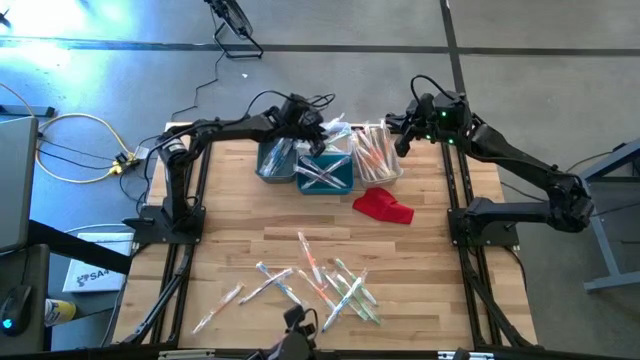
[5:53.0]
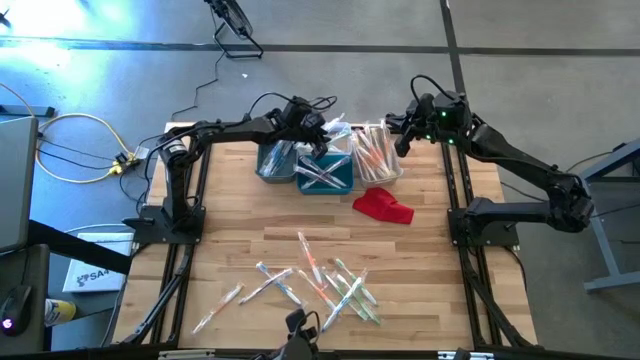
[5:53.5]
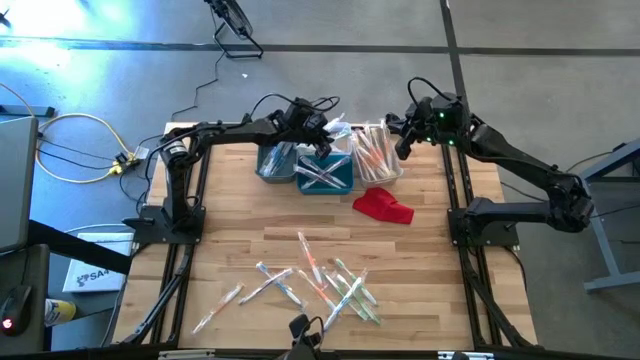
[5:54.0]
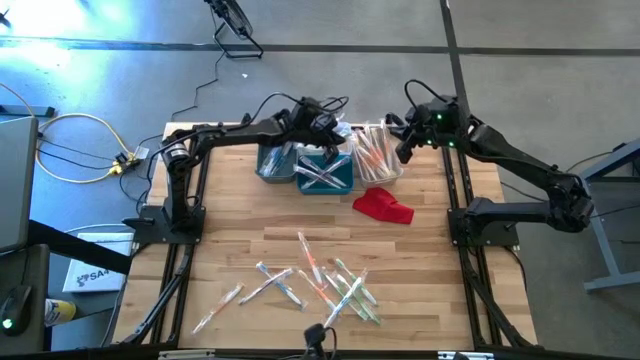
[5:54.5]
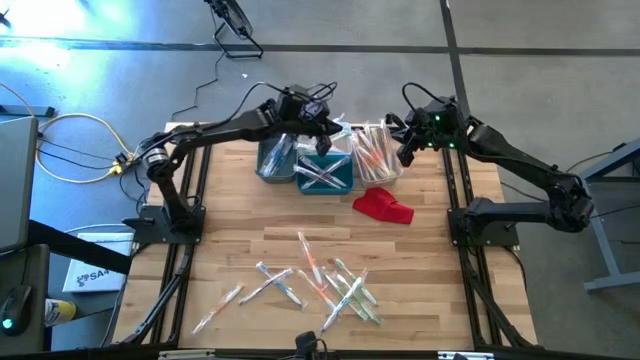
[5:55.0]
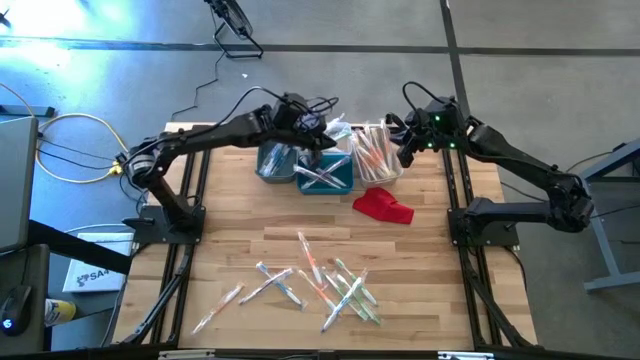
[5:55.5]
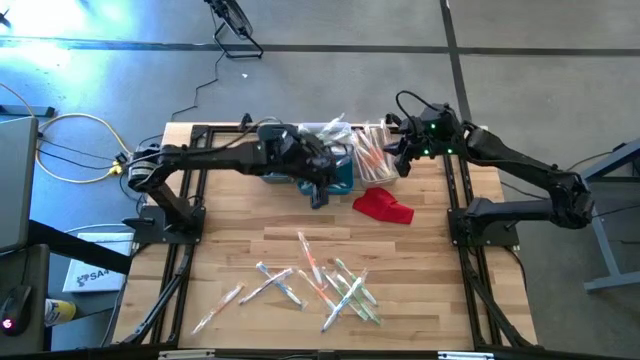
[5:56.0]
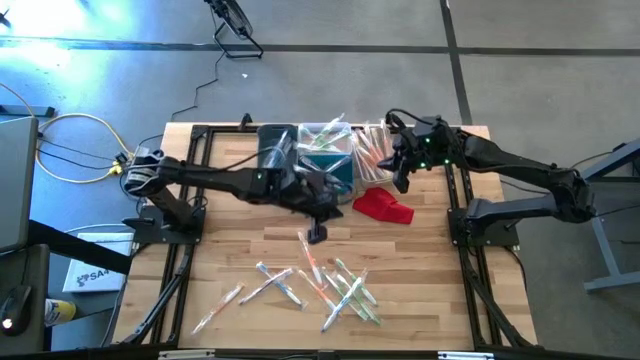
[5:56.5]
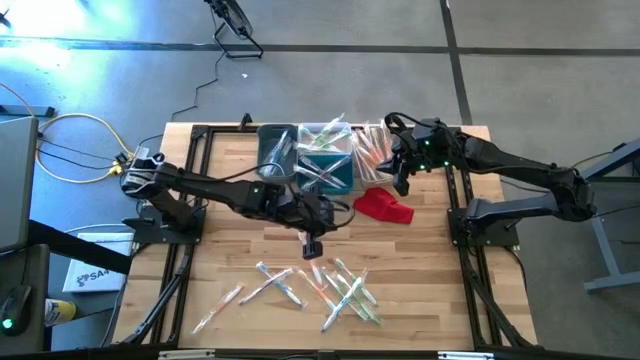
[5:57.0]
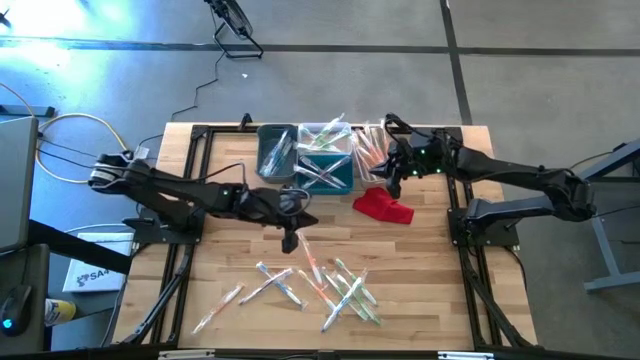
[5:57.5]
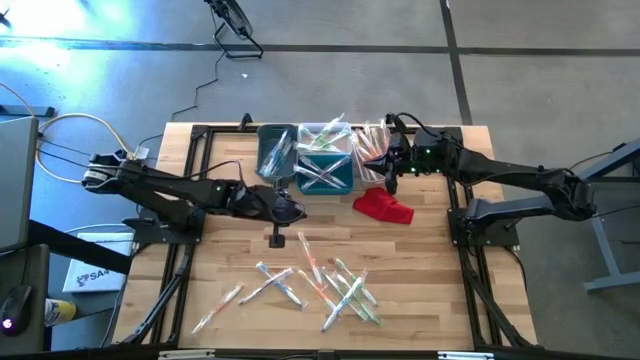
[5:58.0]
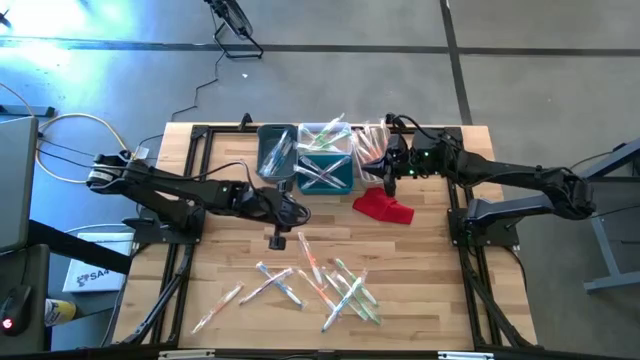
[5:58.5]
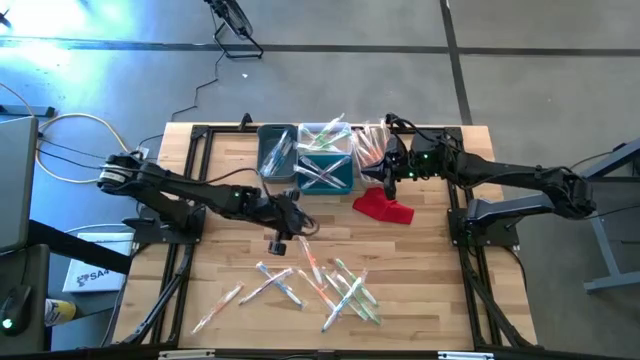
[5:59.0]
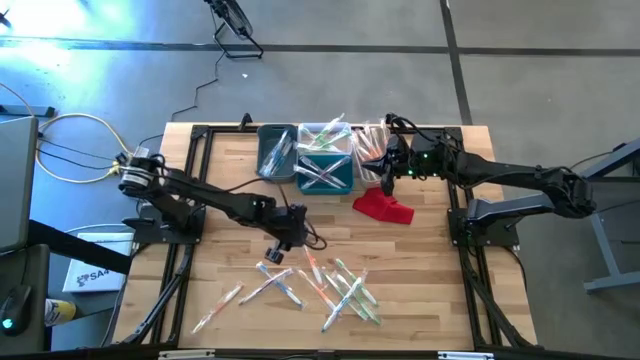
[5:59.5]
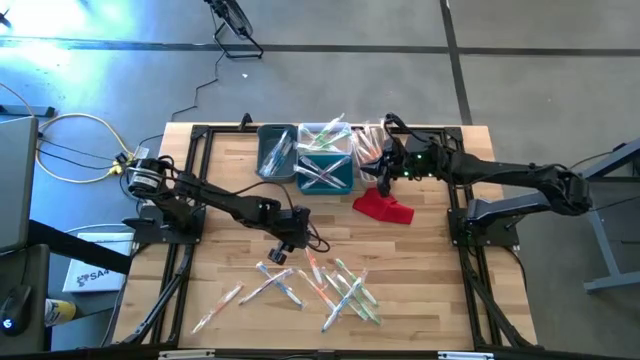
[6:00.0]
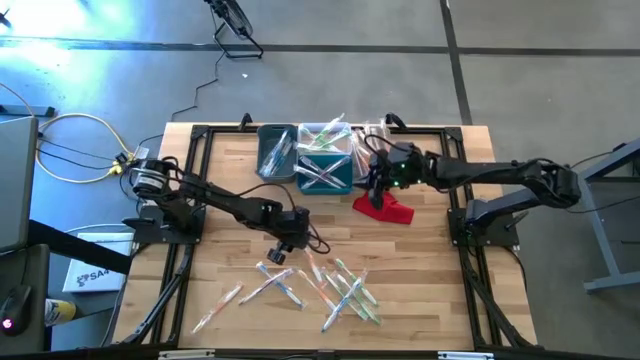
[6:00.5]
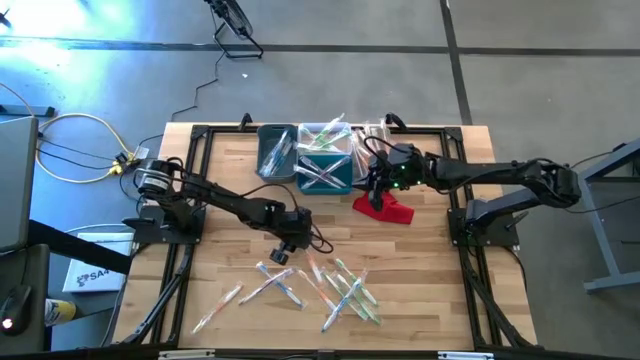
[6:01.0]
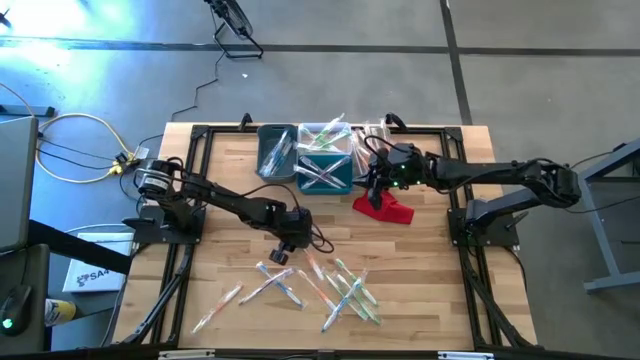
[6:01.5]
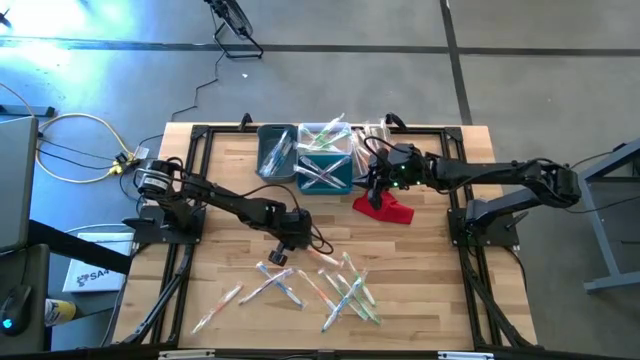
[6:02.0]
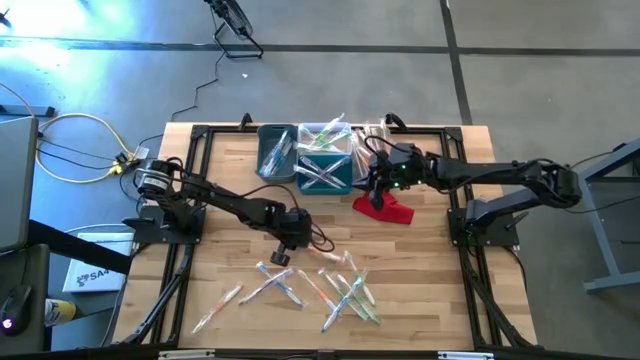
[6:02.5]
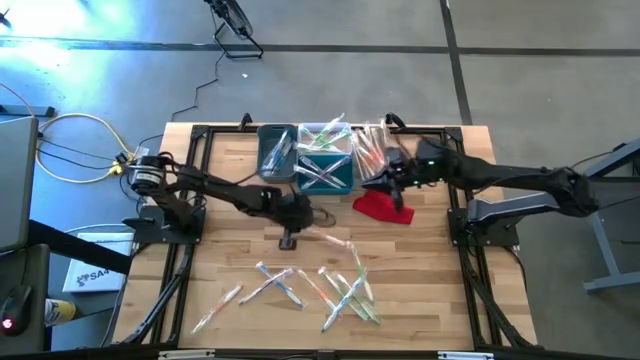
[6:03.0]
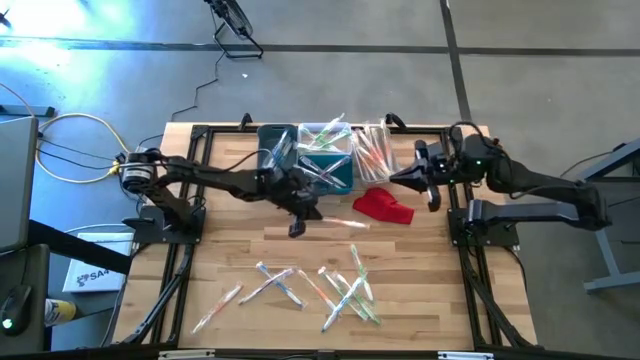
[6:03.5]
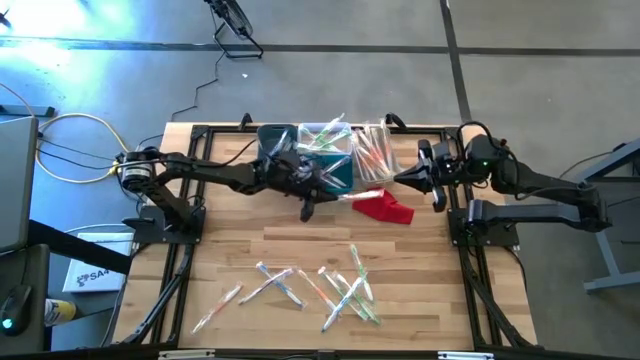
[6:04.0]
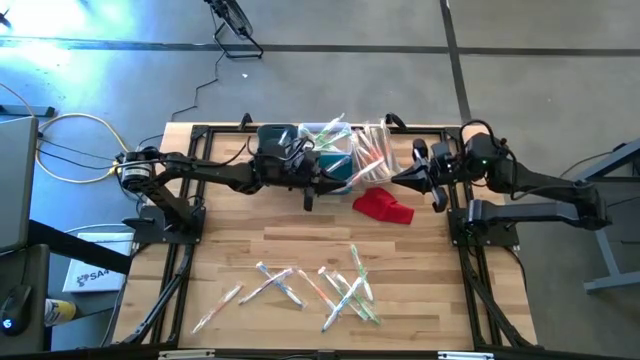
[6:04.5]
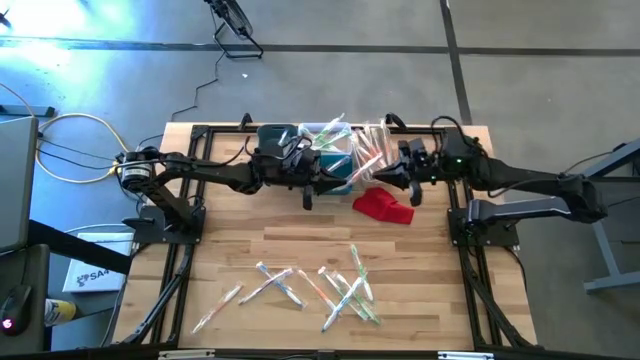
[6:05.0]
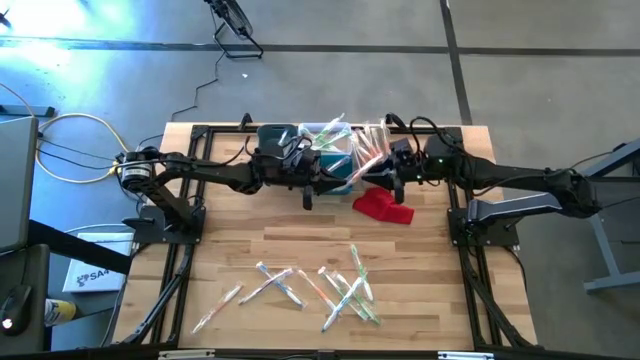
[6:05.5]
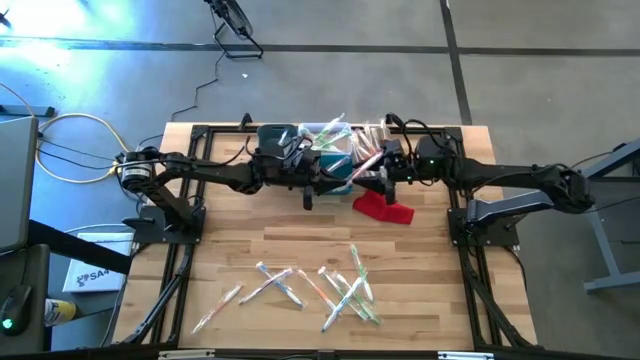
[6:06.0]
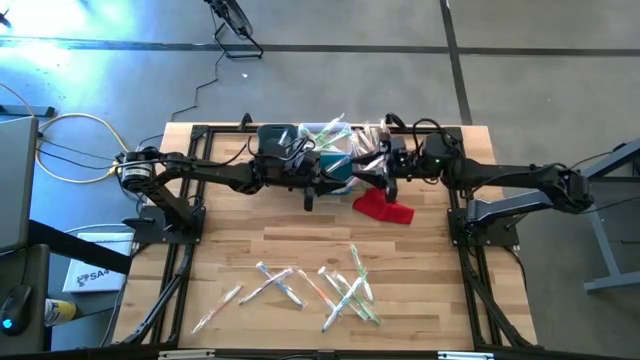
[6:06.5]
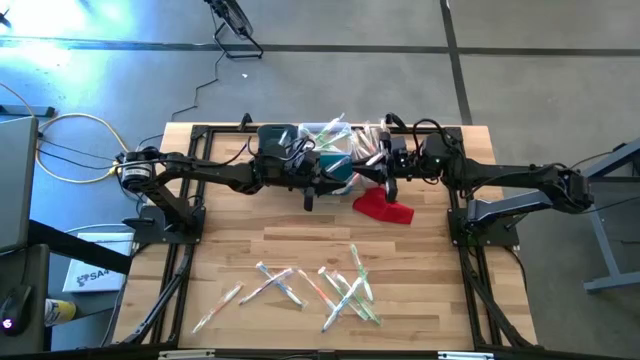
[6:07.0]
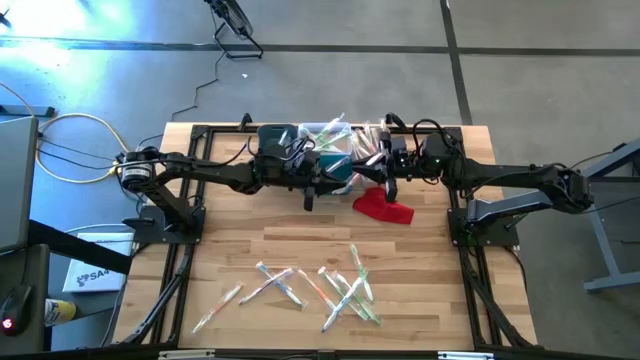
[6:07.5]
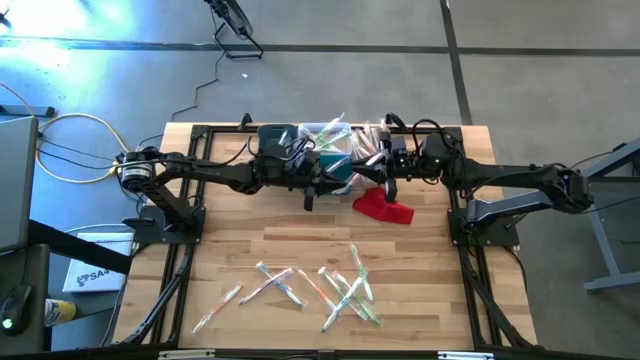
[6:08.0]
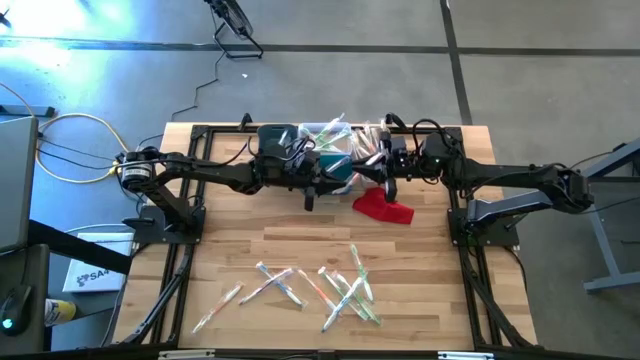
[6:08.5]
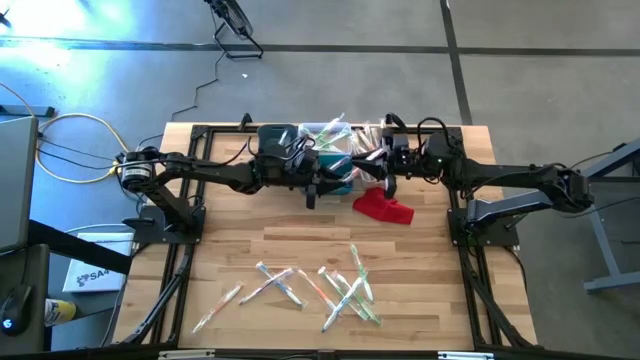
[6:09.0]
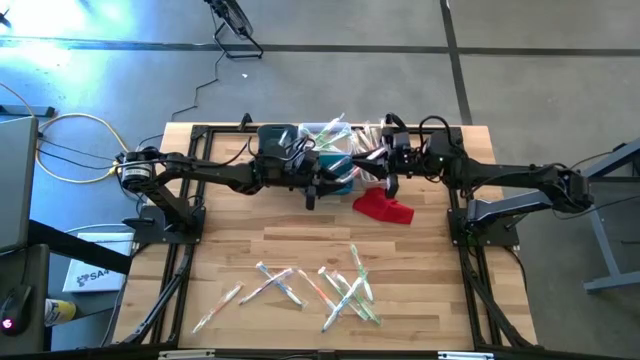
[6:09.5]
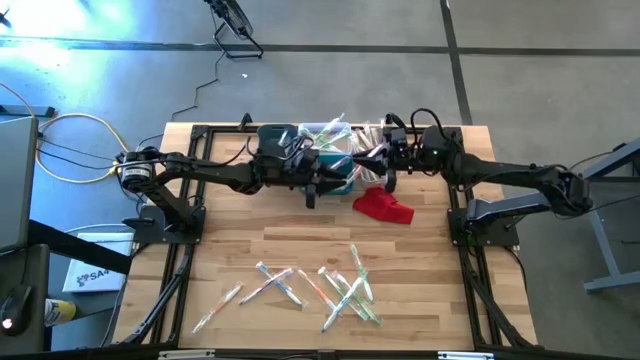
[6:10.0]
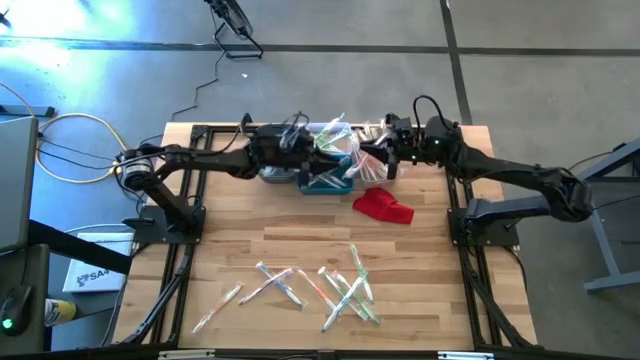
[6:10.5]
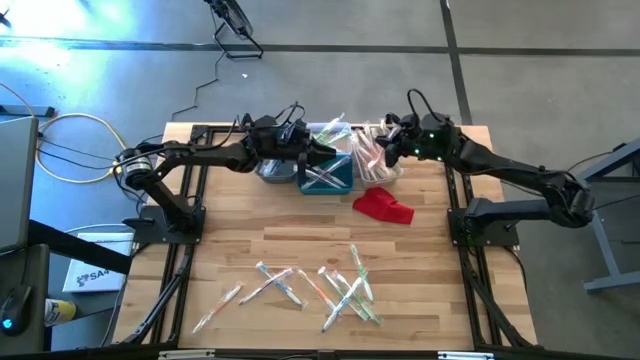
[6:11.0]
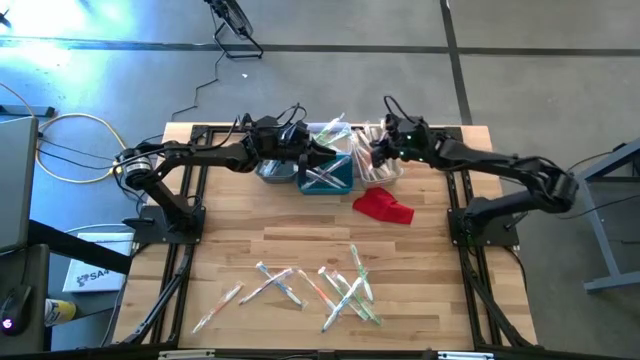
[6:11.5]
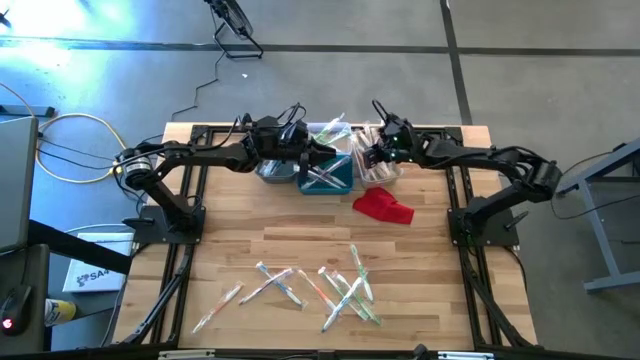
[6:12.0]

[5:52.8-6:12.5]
Task: Pick & Place Toothbrushes
Put the top right orange toothbrush into the white bin

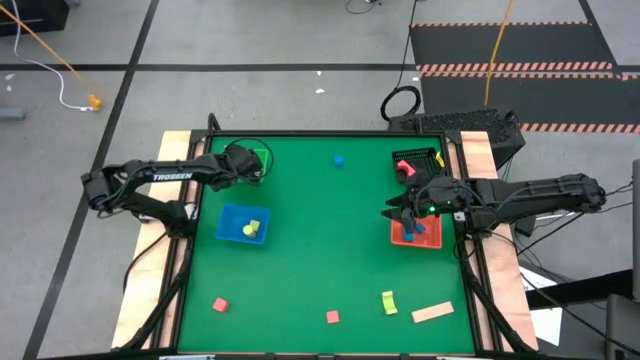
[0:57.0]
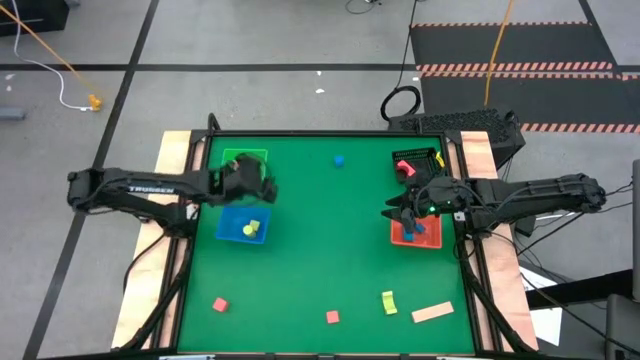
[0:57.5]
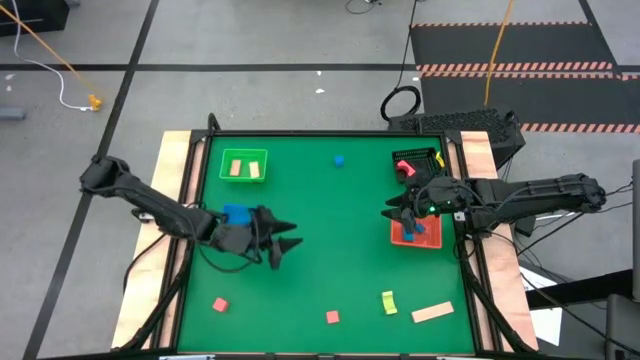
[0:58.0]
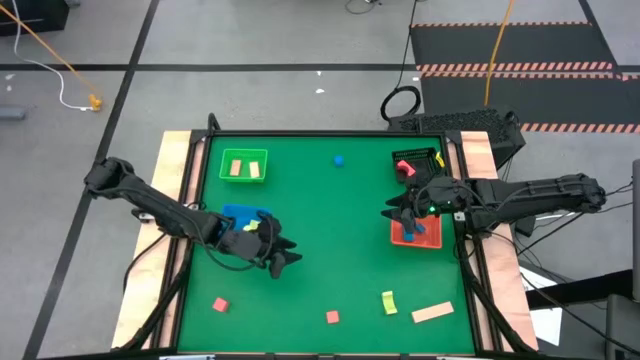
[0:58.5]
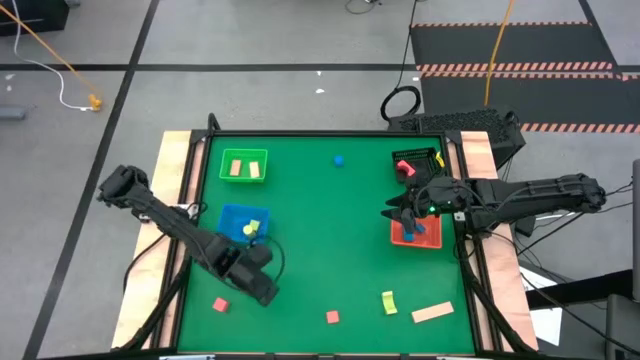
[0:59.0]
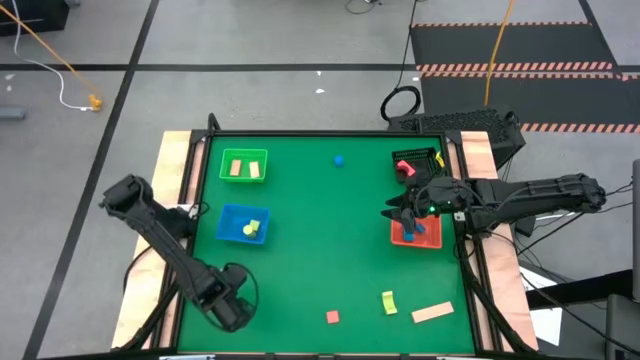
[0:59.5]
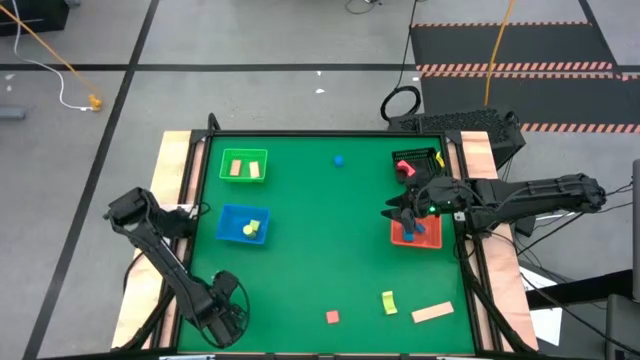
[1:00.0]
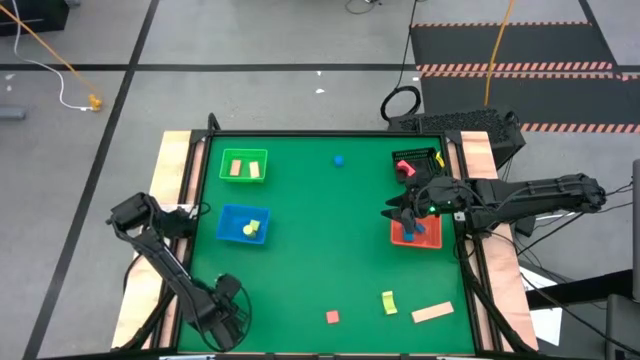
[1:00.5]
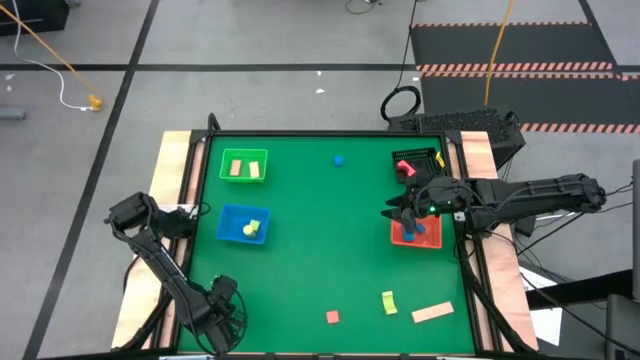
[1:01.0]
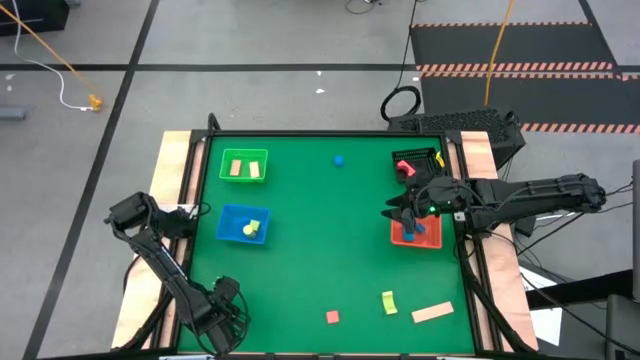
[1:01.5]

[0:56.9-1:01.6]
Task: Sort & place blocks by color
Put the left orange block into the black bin
